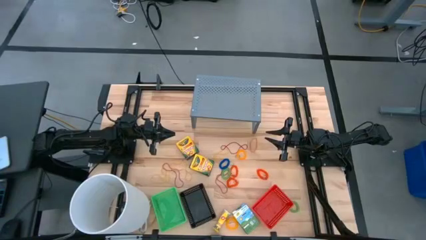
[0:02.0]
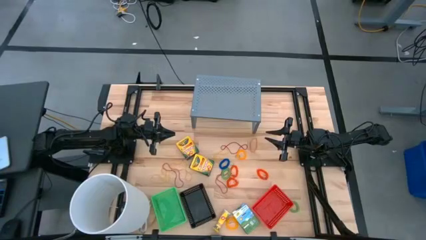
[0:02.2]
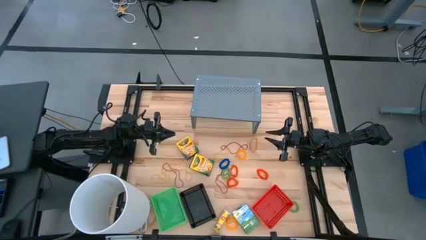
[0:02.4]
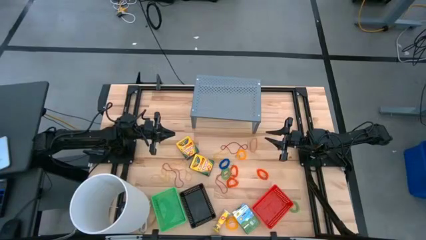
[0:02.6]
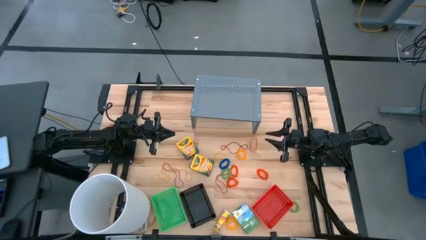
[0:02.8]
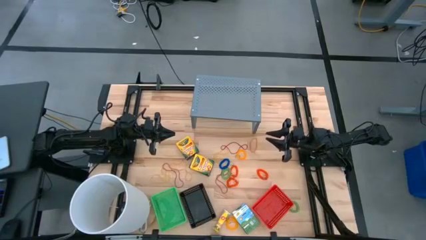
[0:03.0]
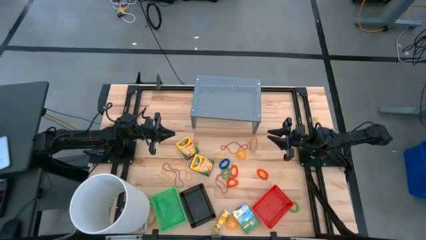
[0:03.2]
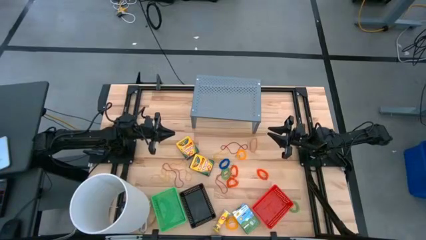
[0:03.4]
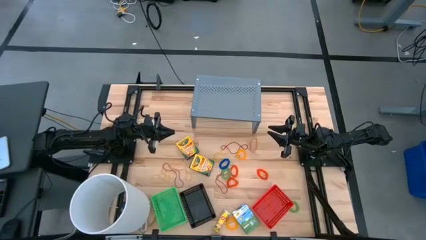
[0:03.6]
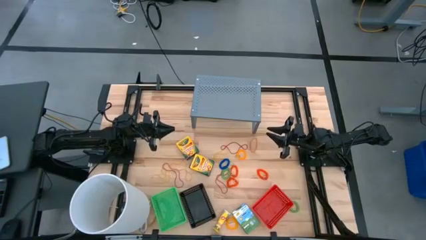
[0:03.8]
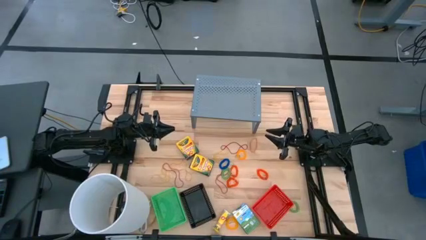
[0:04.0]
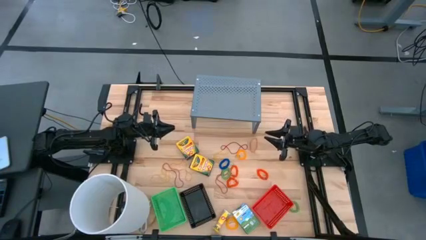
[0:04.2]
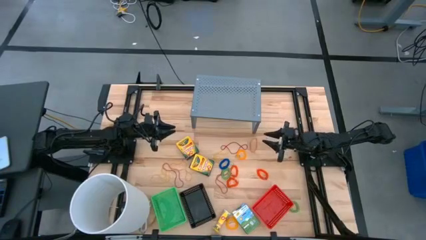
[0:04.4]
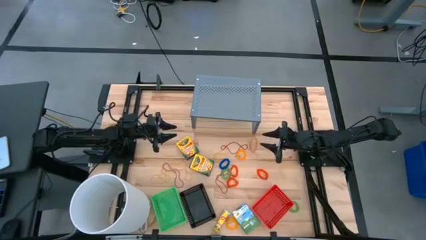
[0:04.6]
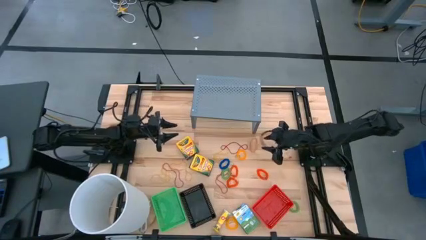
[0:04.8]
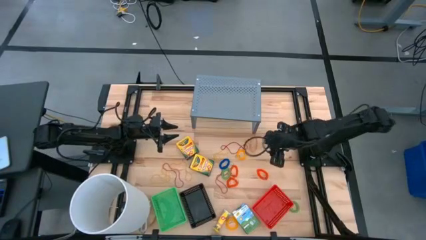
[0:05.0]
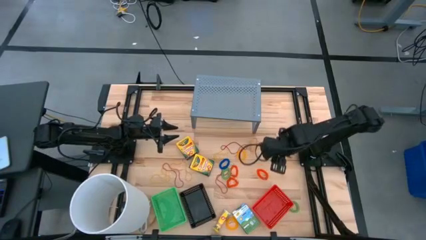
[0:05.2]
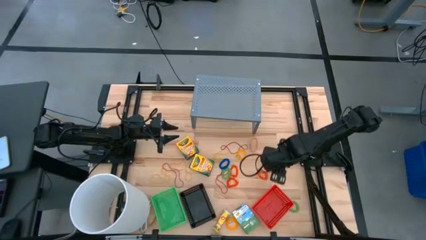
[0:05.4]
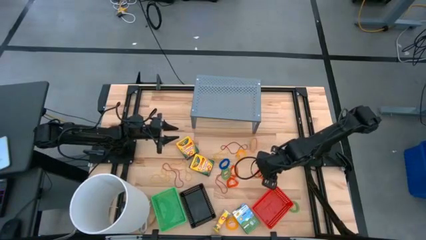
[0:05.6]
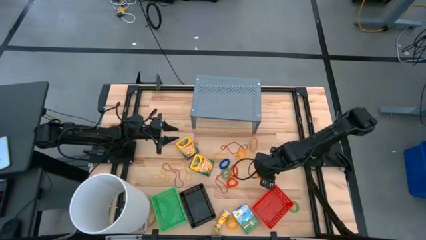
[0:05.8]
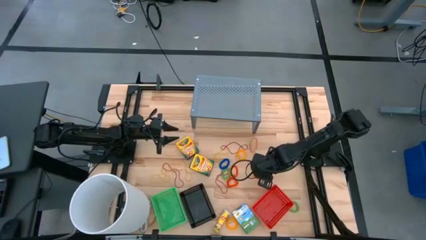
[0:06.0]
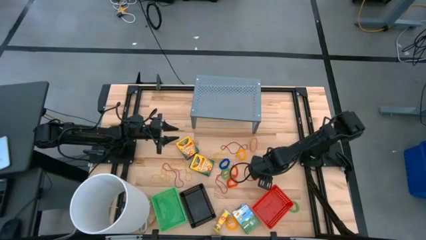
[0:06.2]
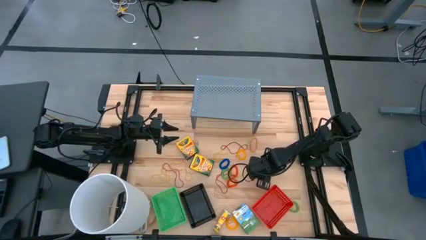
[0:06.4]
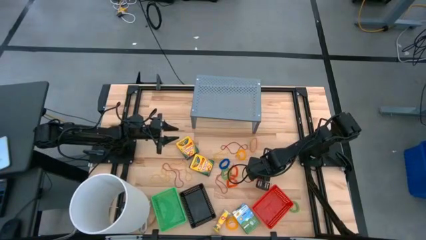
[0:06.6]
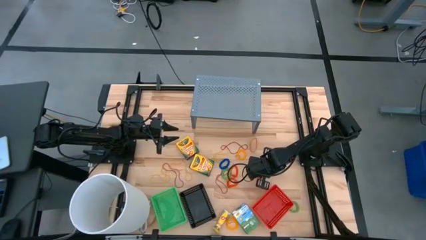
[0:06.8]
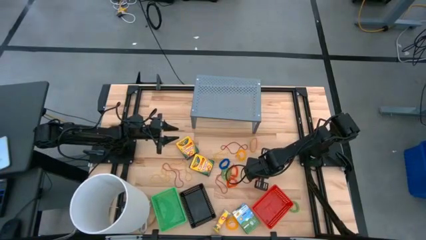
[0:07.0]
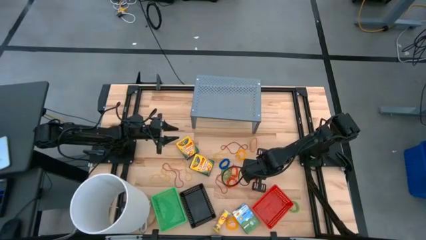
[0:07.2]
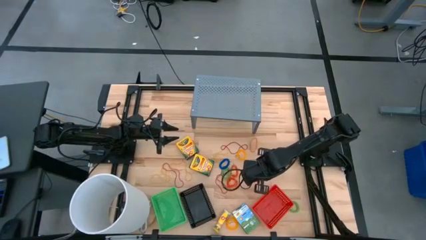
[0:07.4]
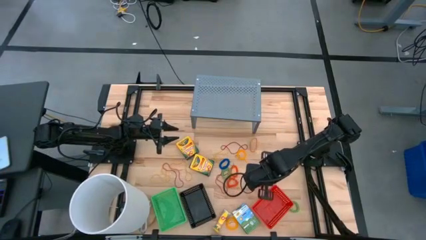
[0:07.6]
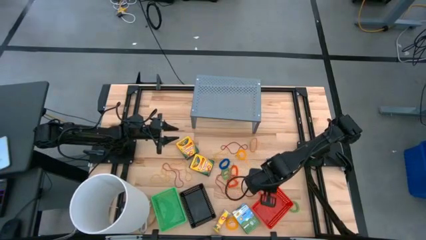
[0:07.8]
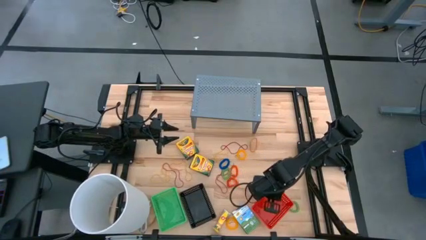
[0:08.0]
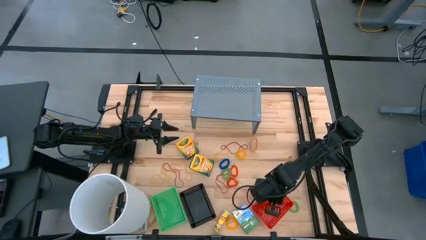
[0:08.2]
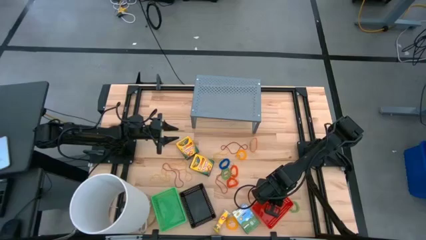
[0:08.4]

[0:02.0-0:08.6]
Task: Pick & Place Office Desk Supplies
Put the orange spring keychain into the red bin

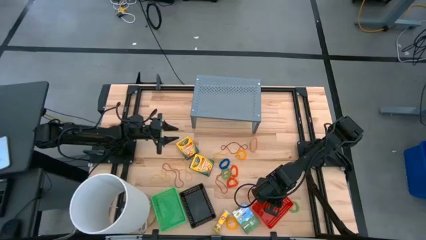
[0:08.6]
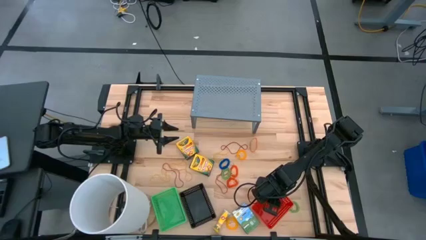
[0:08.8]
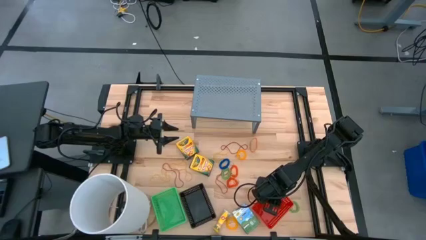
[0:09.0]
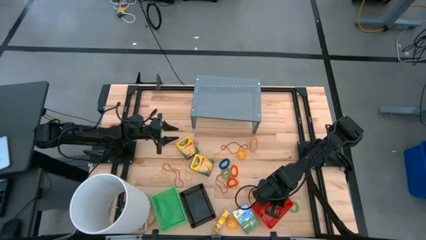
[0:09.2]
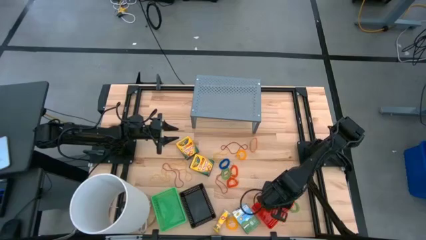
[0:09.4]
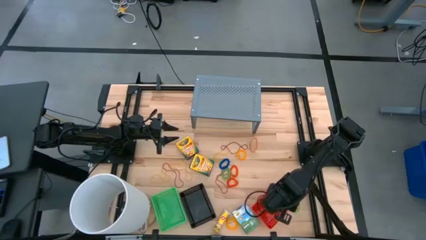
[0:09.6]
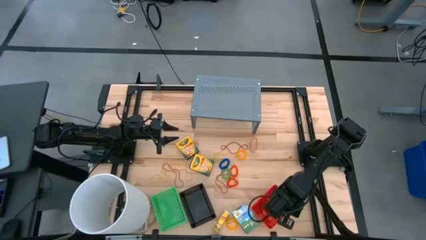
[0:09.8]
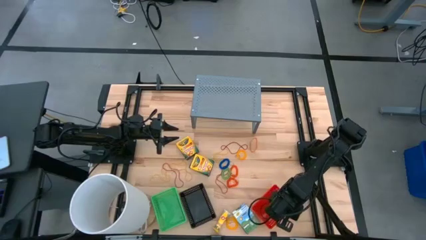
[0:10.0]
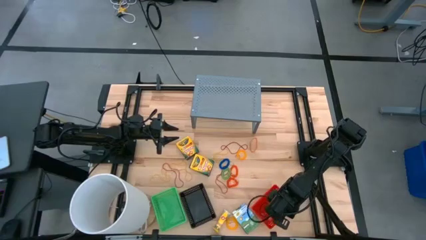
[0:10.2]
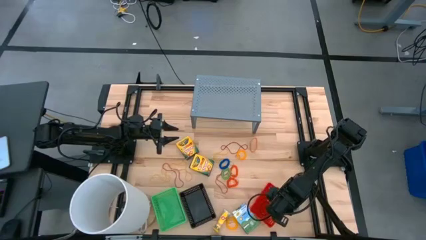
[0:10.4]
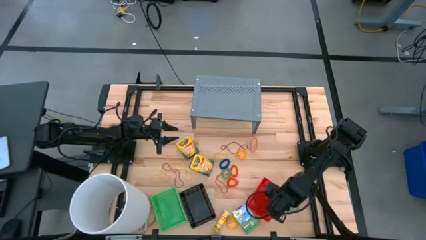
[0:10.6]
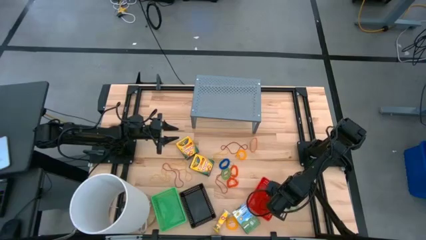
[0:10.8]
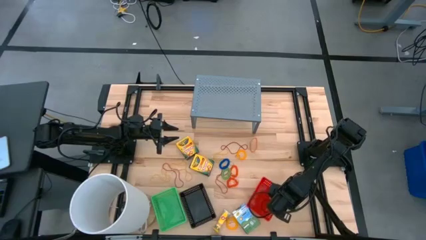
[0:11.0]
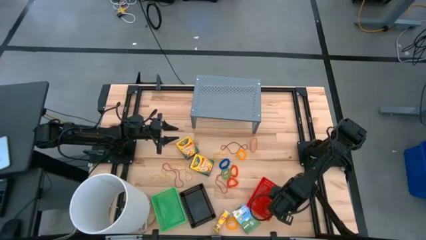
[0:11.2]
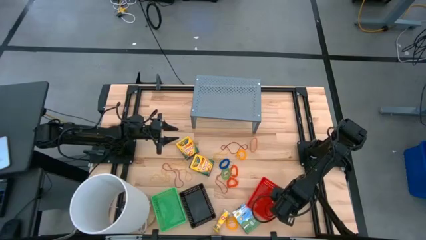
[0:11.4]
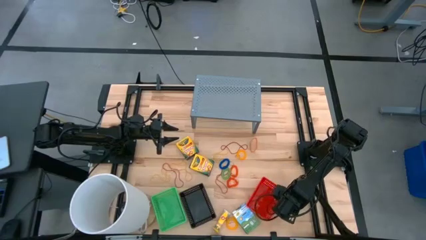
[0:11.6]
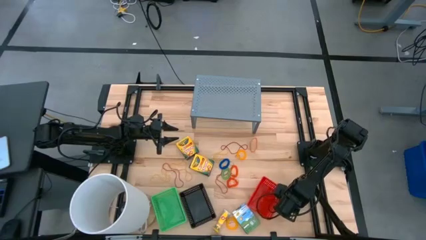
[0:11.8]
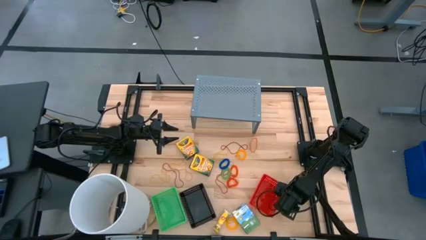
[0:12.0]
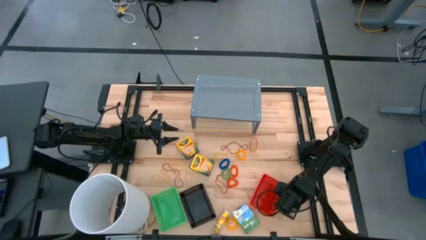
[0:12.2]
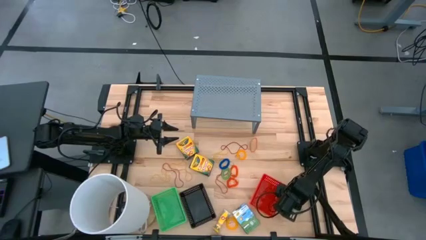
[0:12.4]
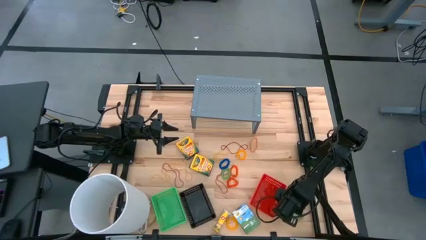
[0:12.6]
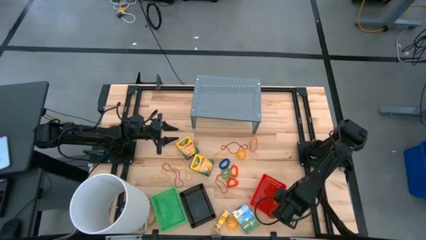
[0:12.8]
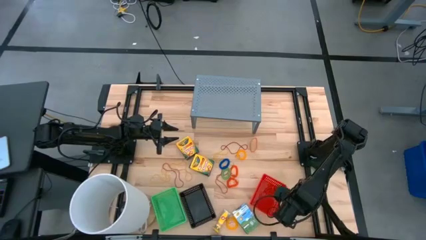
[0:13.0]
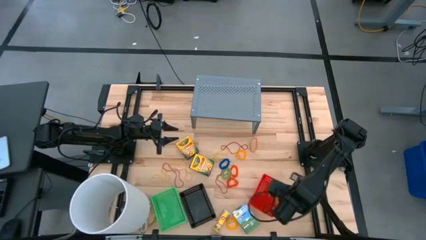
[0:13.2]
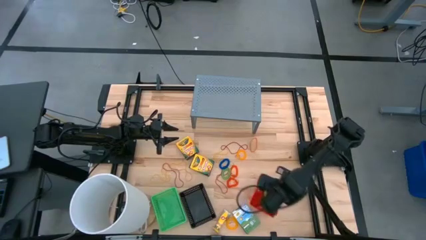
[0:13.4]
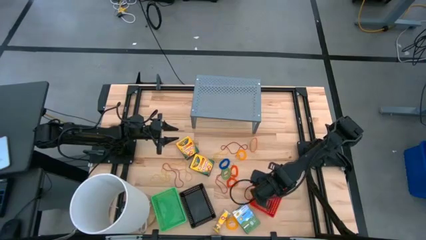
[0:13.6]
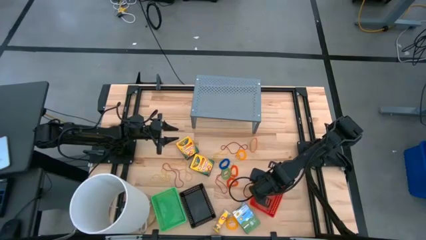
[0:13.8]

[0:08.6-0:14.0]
Put the green spring keychain into the red bin

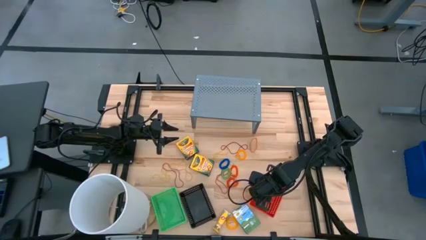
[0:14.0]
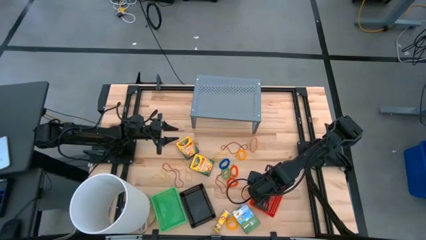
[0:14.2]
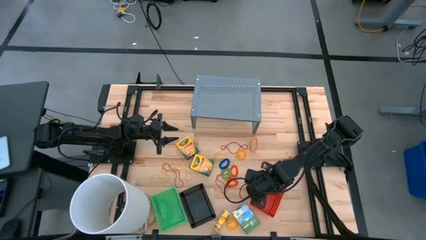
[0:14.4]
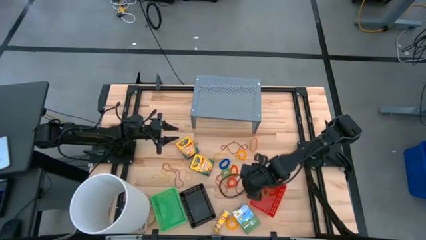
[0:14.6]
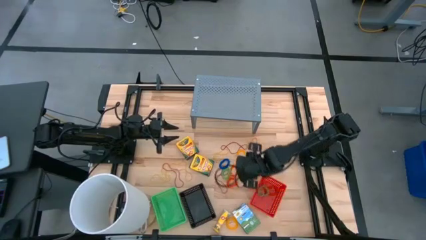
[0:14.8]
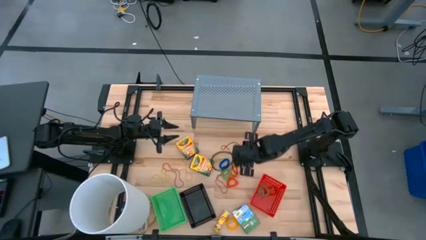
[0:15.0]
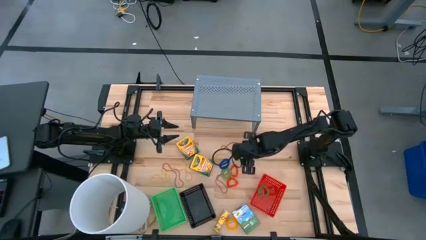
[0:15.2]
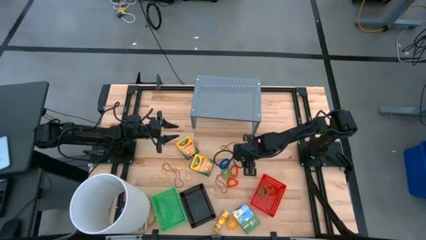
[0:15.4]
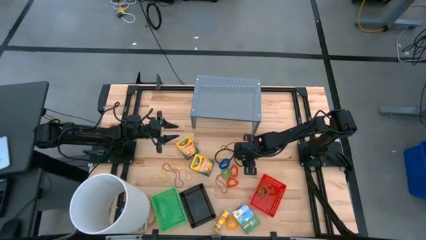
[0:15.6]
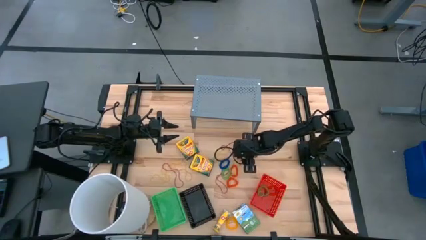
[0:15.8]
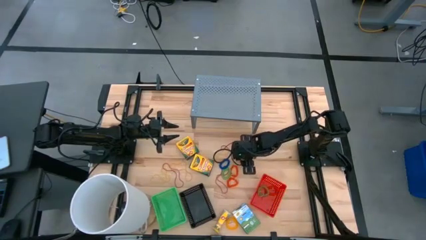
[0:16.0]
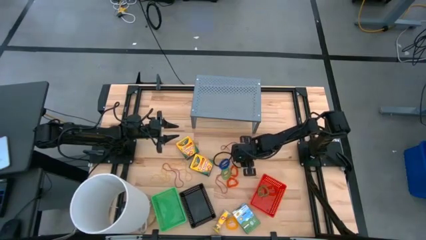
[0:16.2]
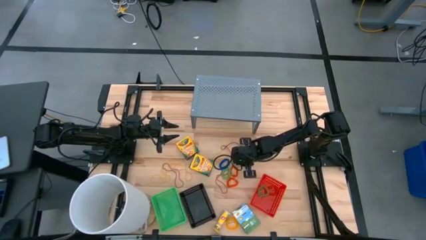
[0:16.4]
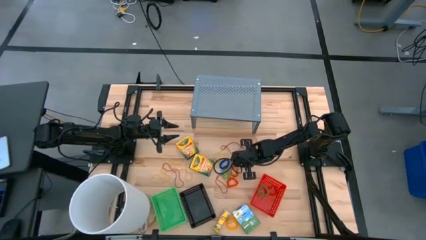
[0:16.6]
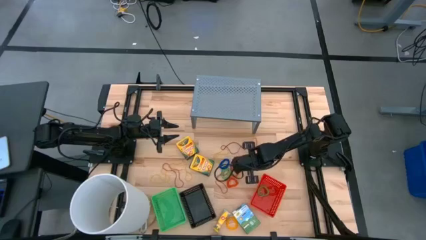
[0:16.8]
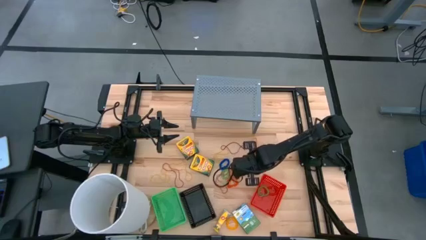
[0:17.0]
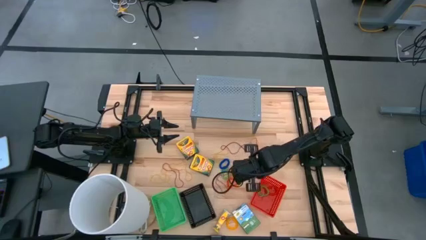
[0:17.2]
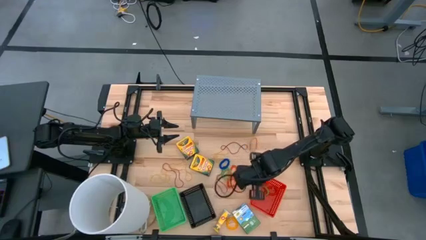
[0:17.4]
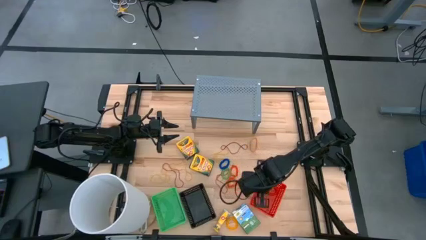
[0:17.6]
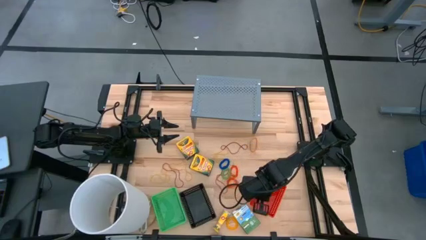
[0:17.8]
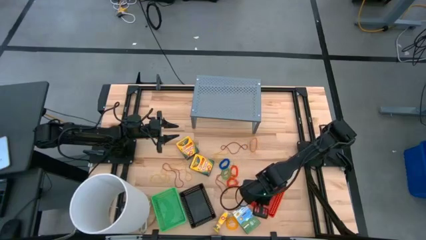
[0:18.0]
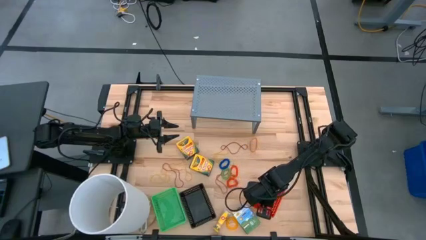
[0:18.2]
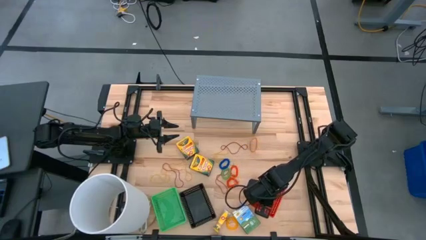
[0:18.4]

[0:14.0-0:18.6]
Put the yellow spring keychain into the red bin
